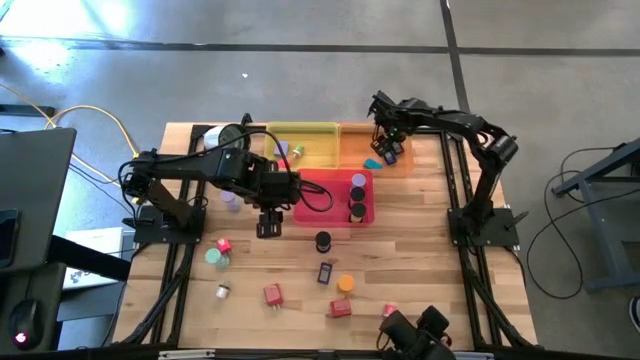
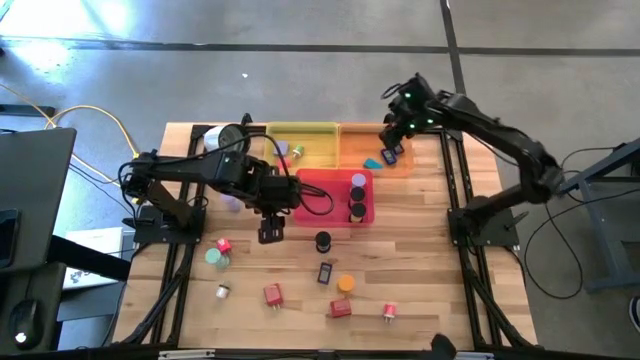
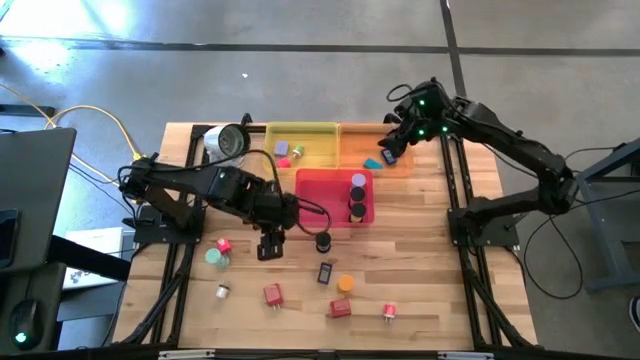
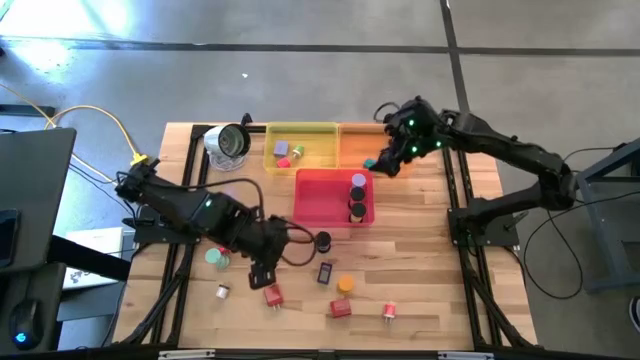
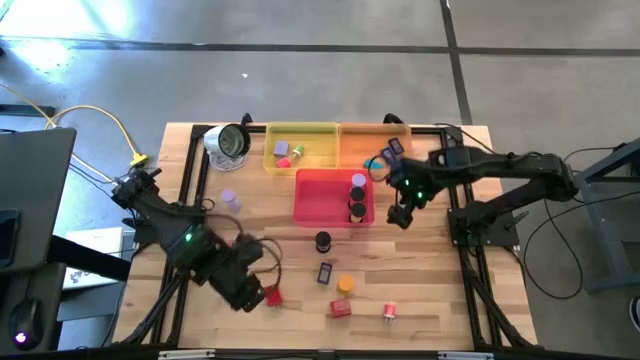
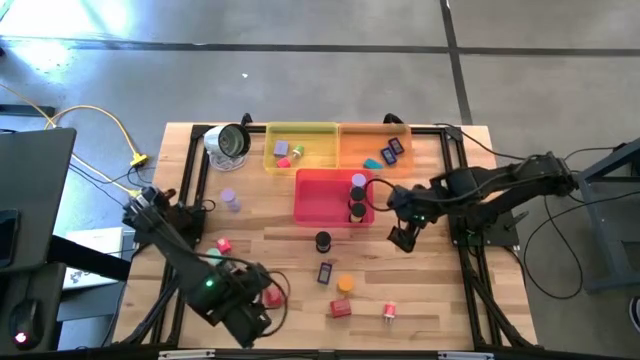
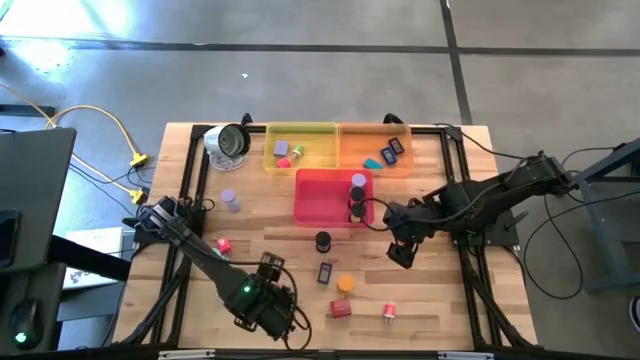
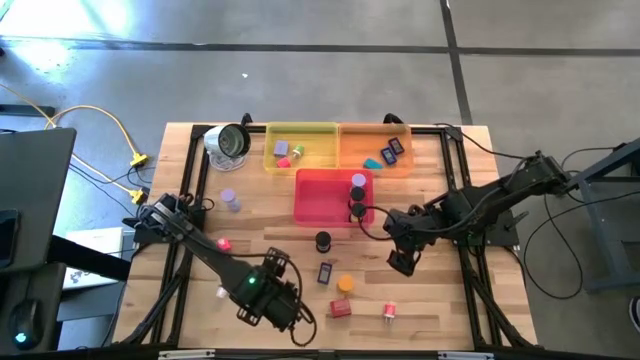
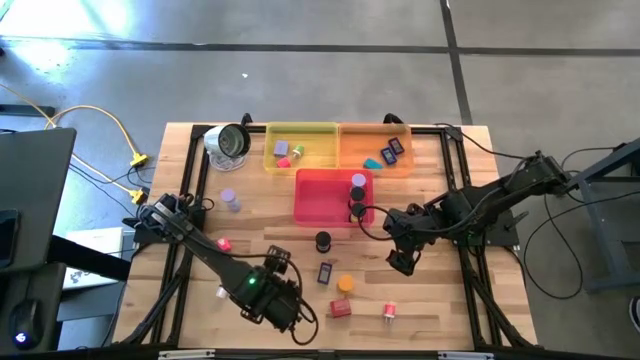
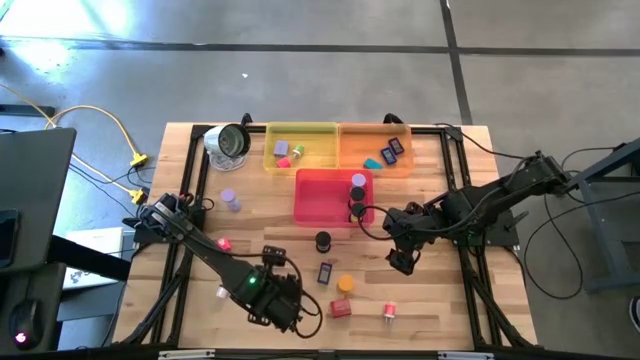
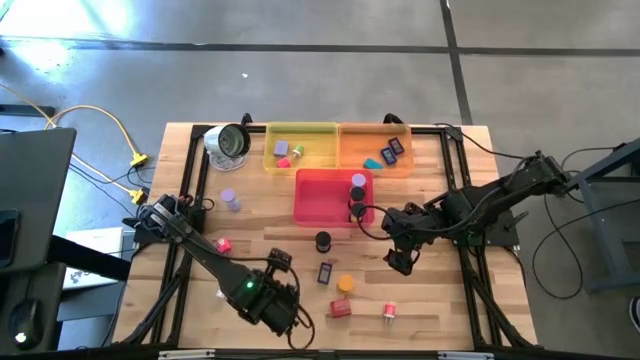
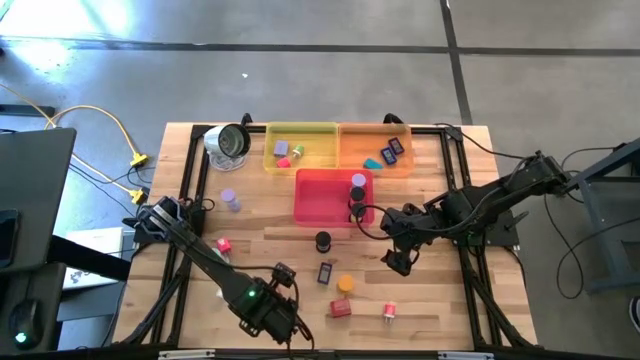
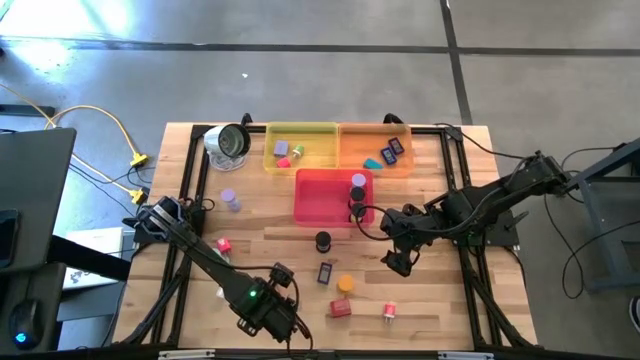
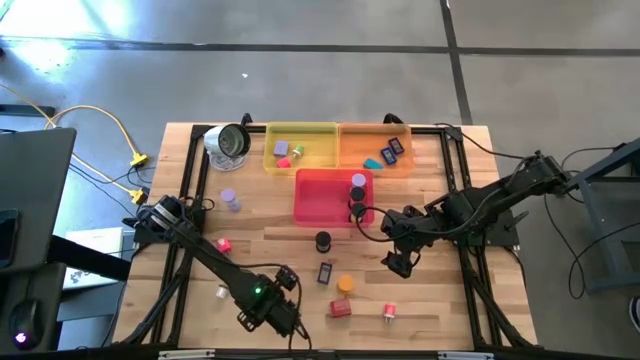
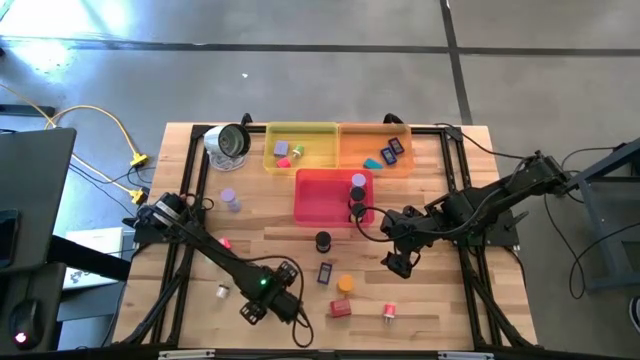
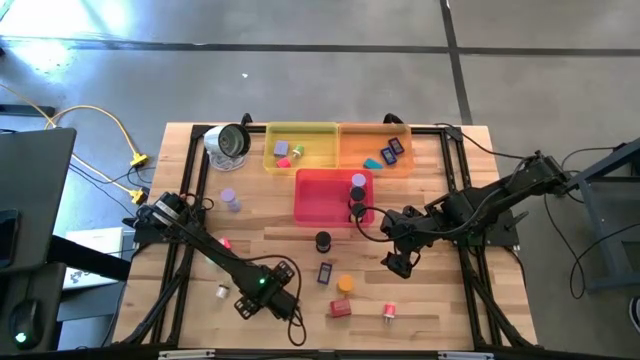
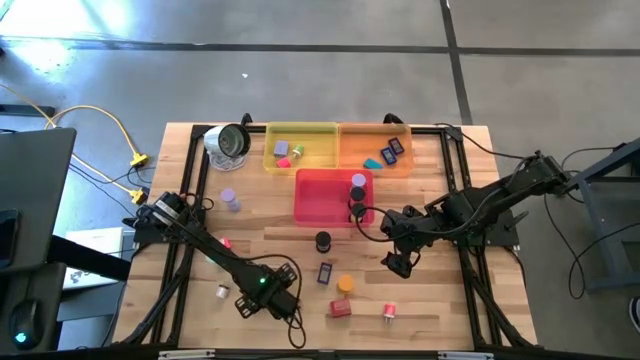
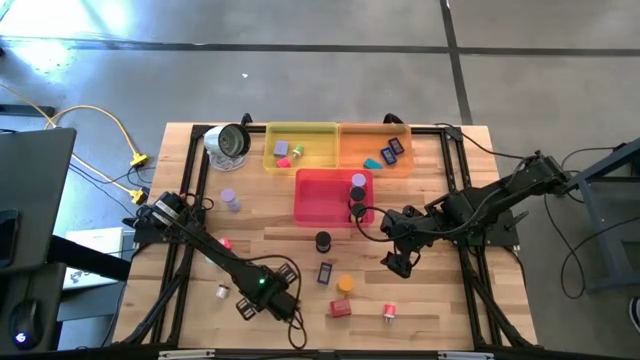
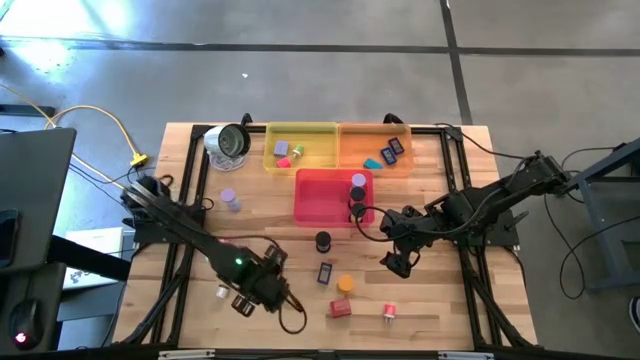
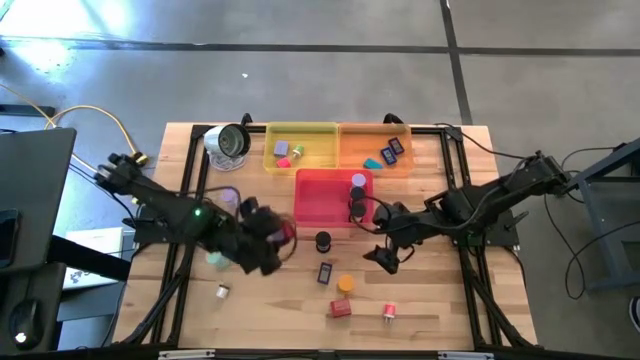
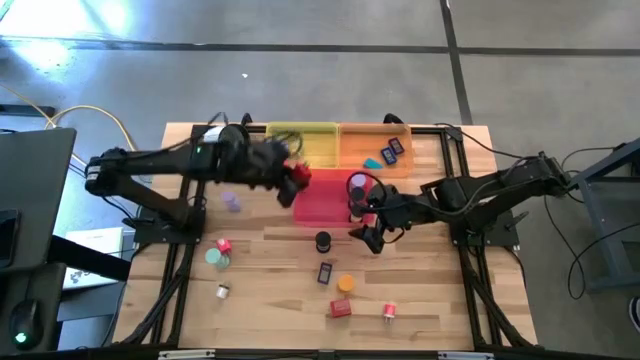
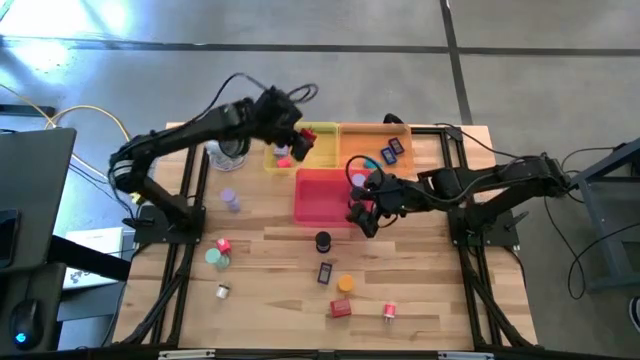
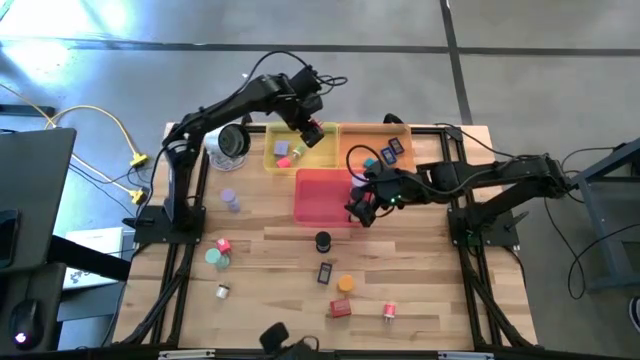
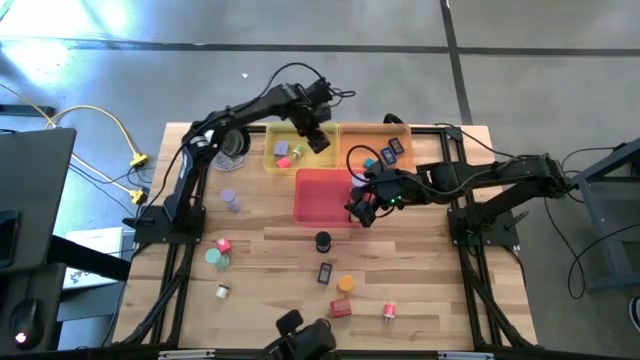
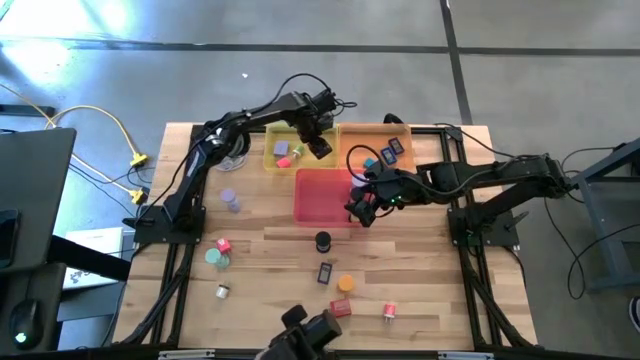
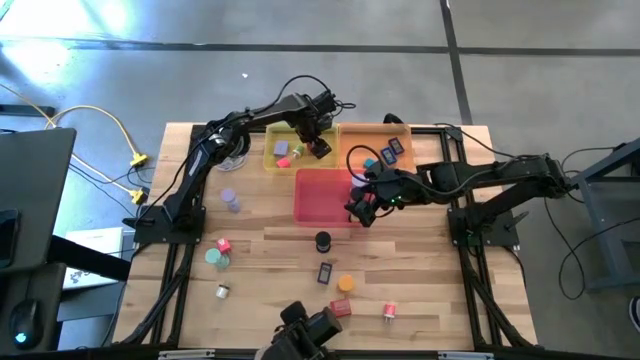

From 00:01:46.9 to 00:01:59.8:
Task: Pick & Place Office items
Put the left red charger adapter into the yellow bin

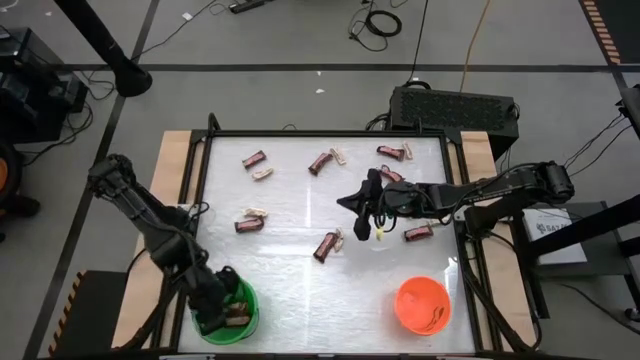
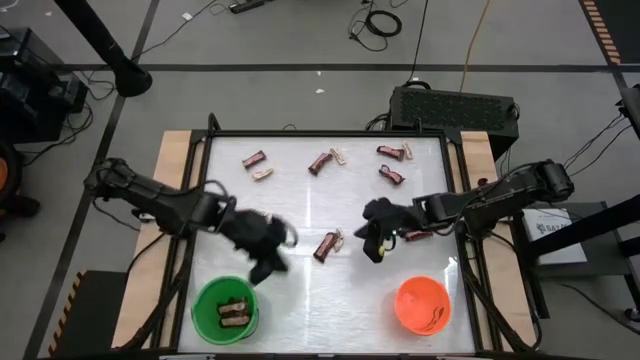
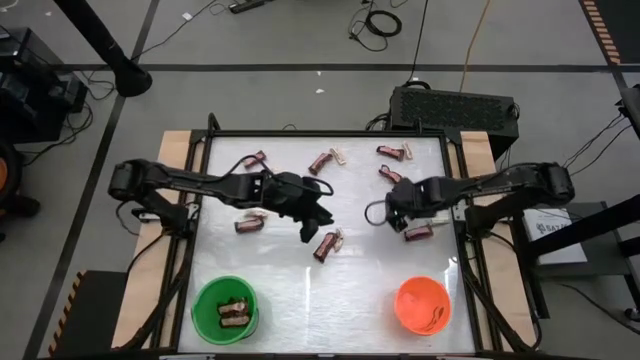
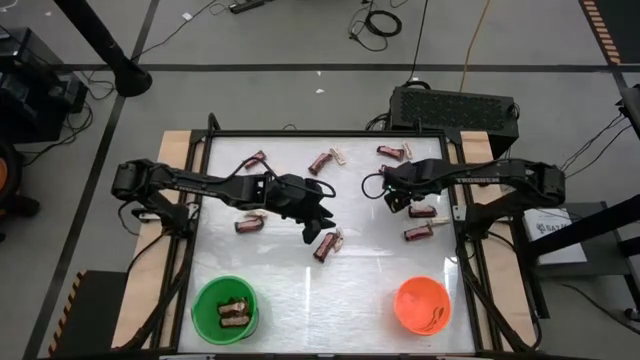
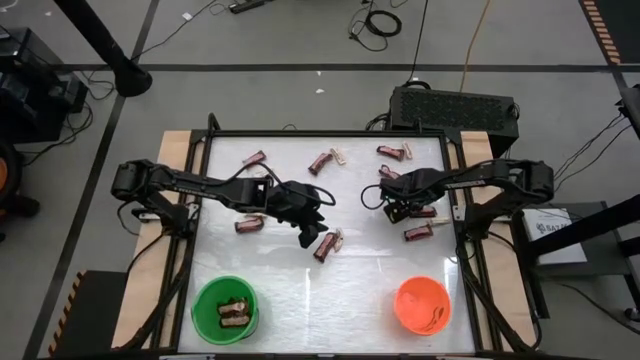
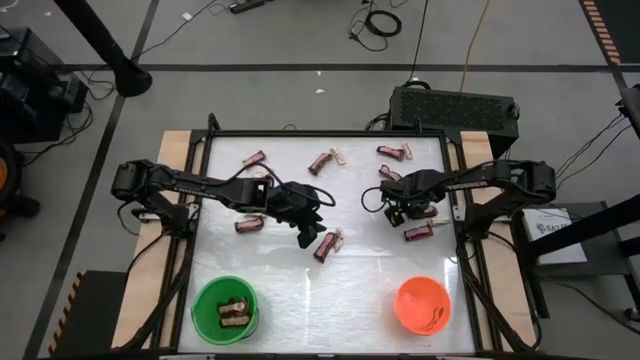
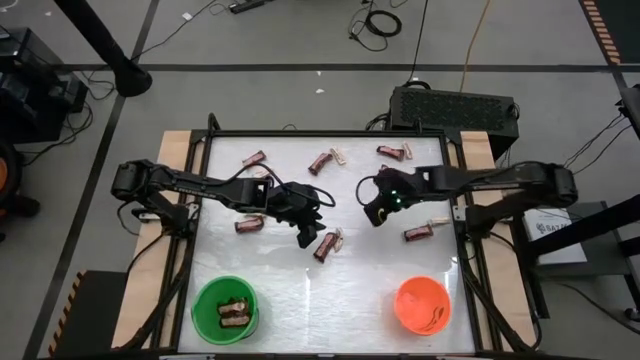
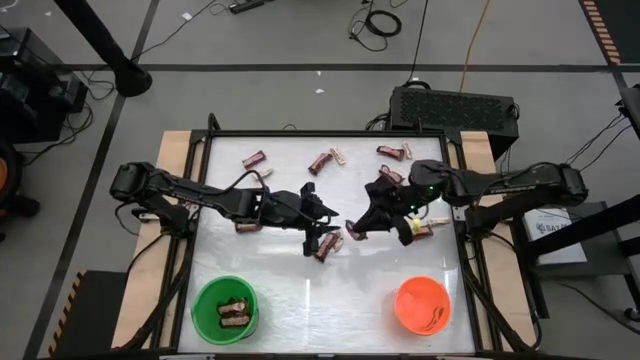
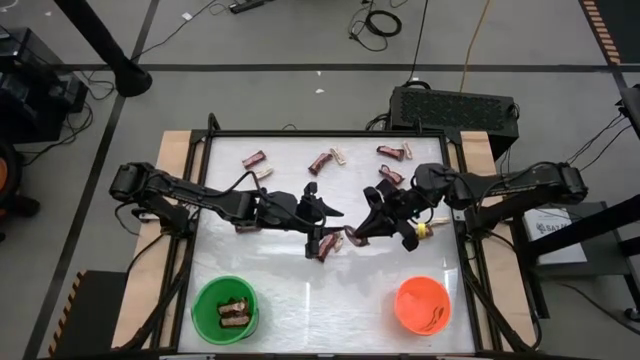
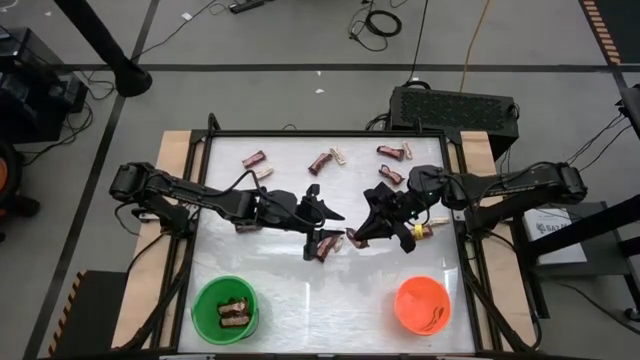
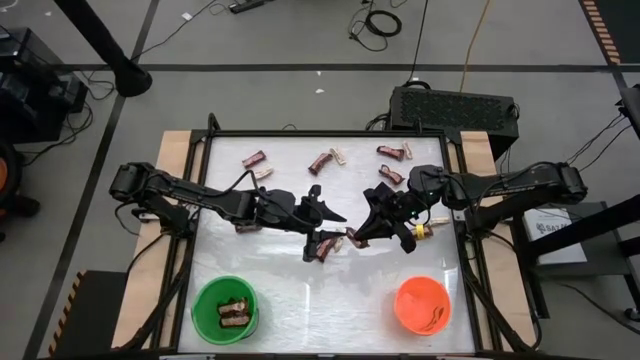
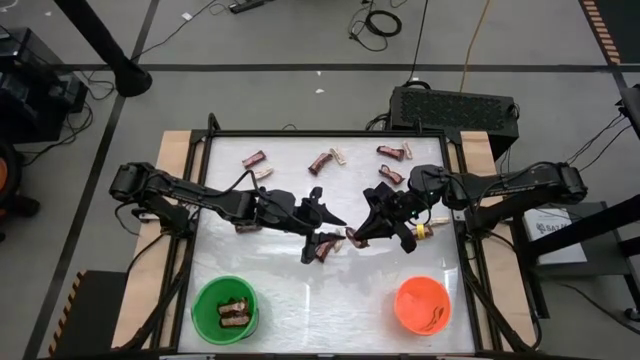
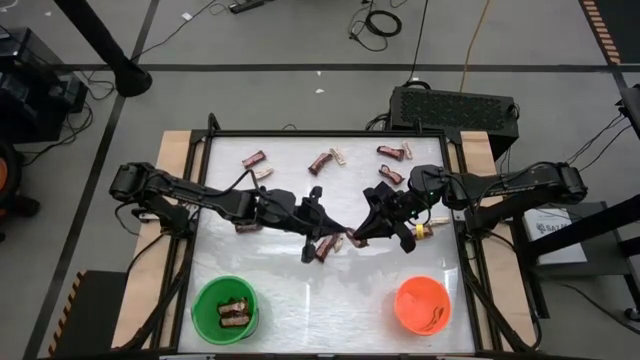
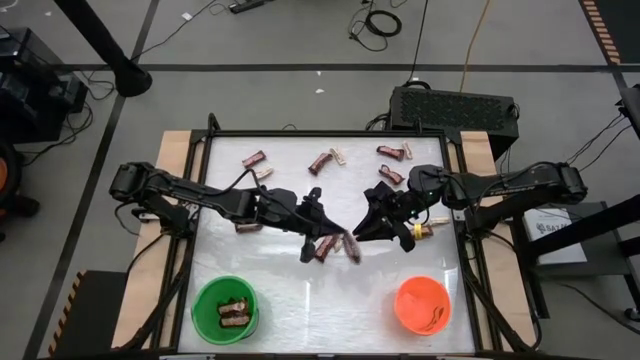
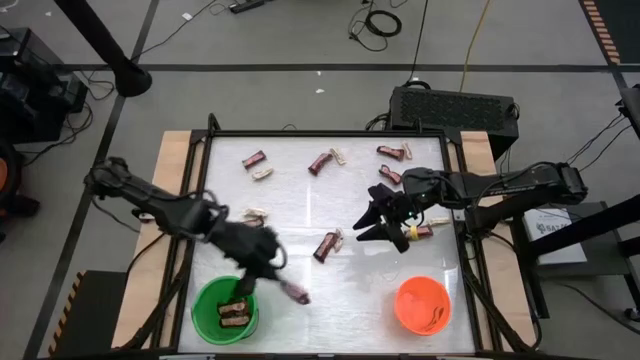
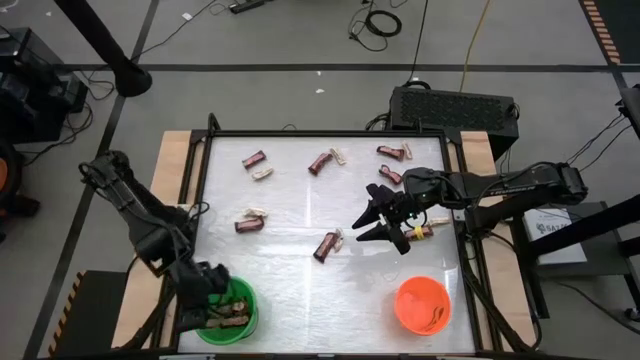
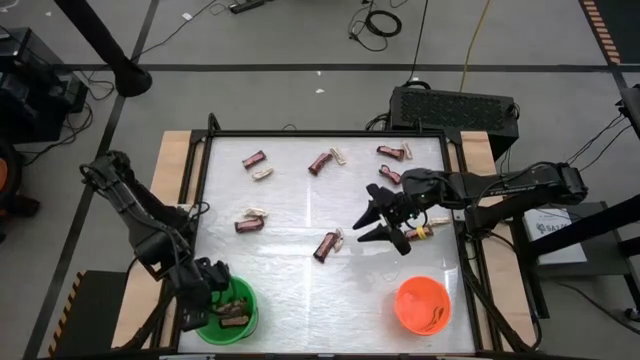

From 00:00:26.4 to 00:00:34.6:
Task: Sort candy by brand, put in halloween buckets
Put the brown chocolate bar into the green bucket
